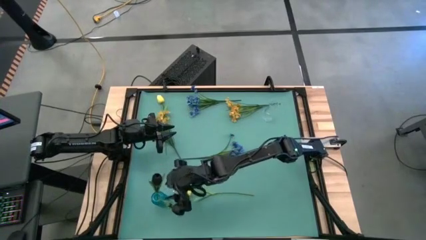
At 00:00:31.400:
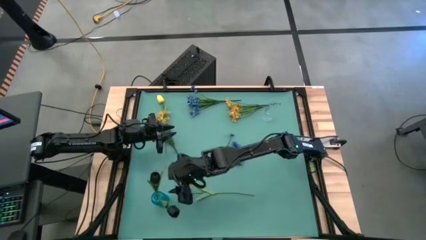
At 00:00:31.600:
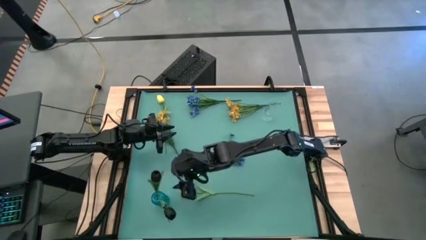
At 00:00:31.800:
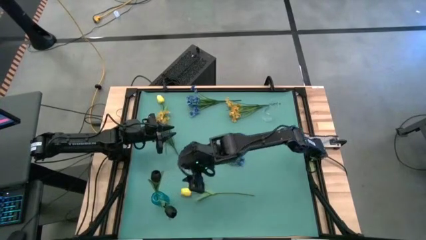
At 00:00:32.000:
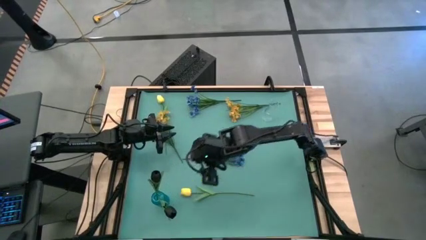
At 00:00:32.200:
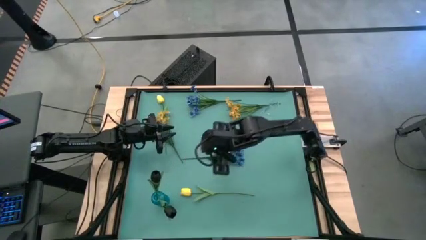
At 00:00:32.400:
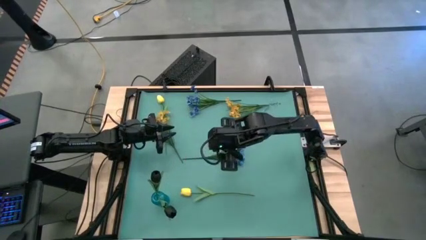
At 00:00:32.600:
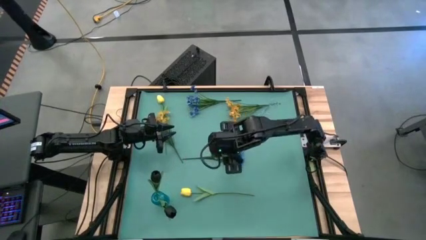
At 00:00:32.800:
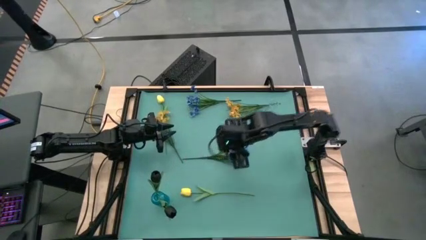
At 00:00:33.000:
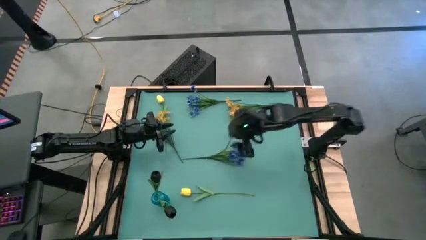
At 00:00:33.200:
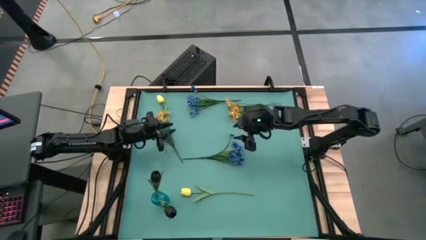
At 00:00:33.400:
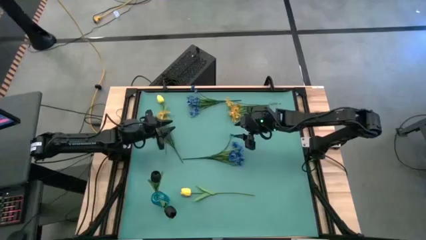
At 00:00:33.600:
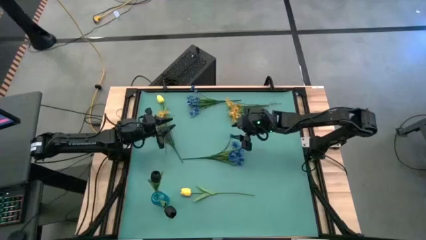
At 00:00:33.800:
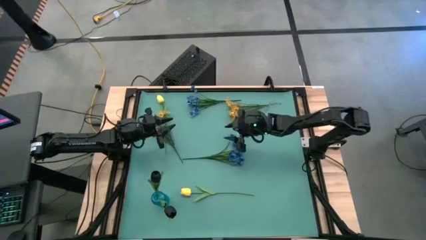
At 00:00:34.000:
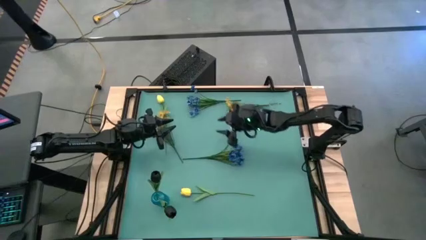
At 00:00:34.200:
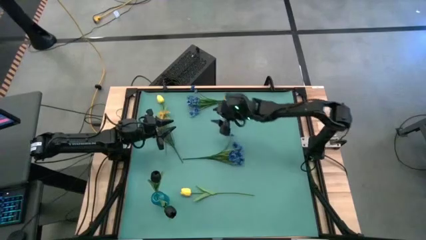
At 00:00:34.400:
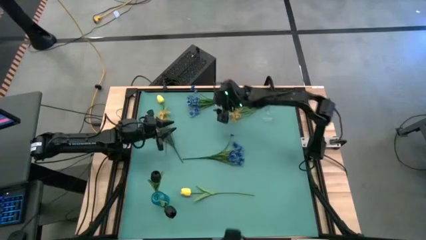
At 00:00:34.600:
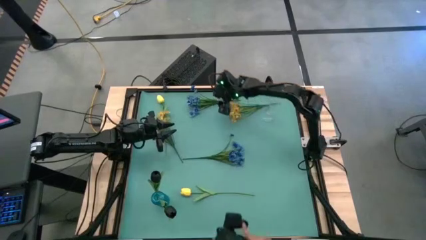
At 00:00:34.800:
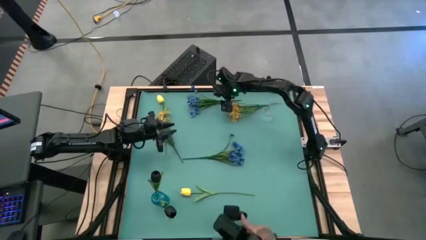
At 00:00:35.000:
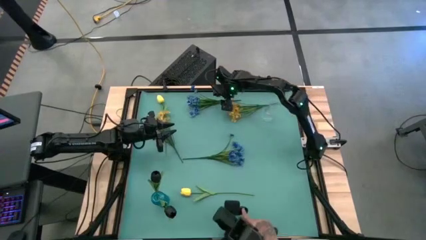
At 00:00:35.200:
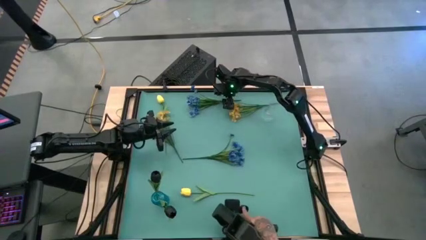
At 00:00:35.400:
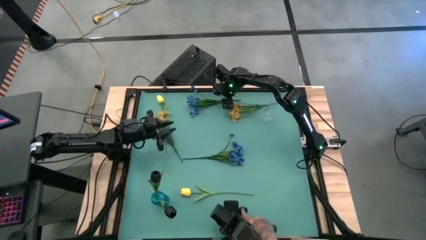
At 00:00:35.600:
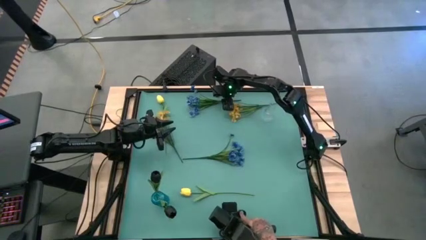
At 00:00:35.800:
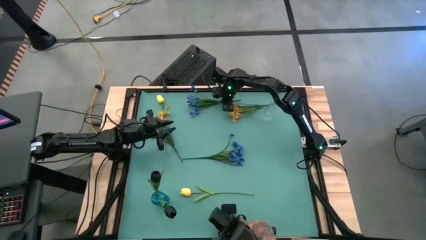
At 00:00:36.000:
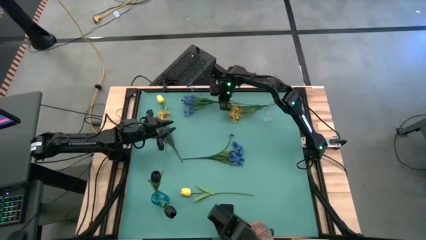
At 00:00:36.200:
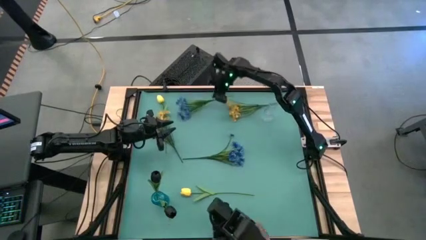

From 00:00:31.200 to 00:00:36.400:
Task: Sort flowers into vase by color
Put the top blue flowers into the blue flower vase

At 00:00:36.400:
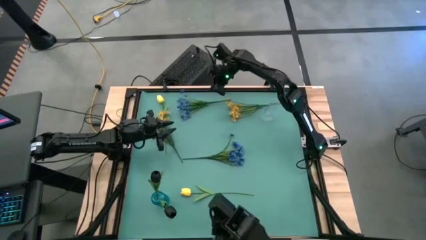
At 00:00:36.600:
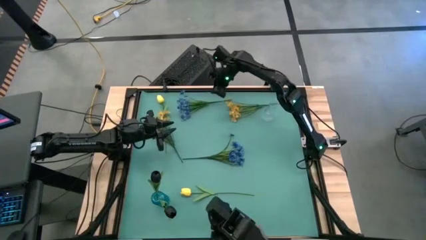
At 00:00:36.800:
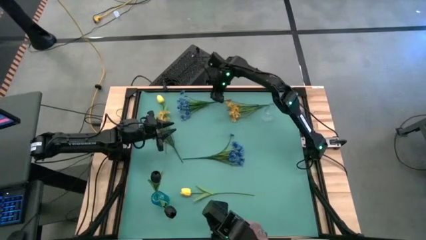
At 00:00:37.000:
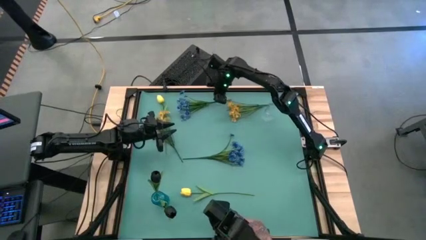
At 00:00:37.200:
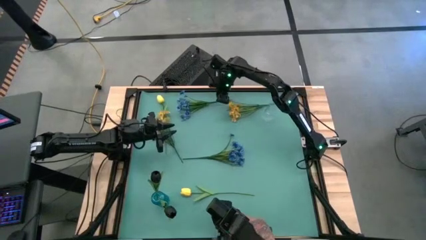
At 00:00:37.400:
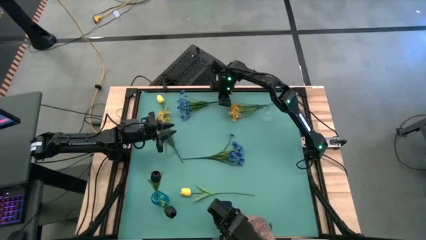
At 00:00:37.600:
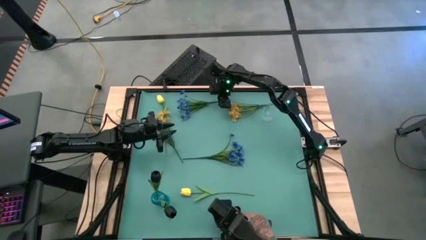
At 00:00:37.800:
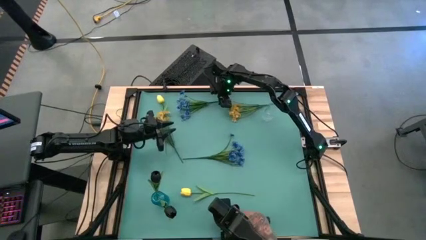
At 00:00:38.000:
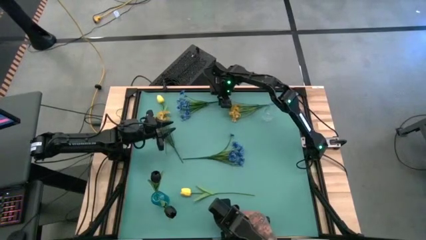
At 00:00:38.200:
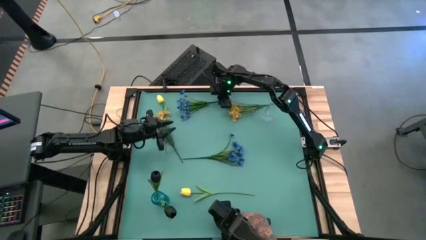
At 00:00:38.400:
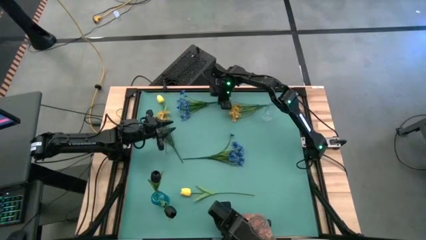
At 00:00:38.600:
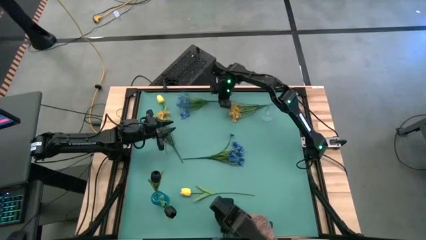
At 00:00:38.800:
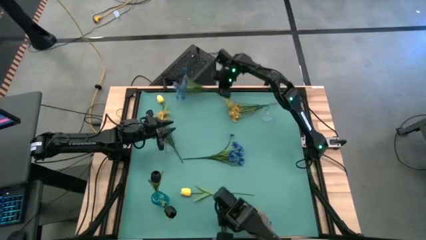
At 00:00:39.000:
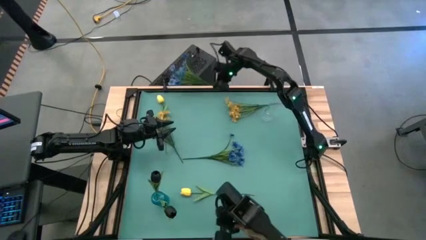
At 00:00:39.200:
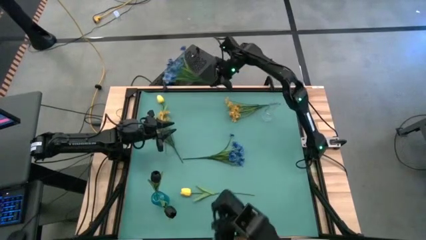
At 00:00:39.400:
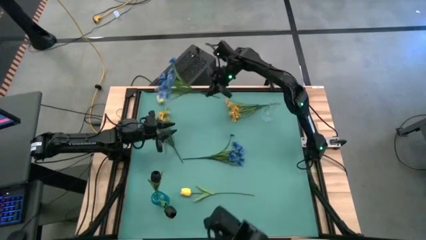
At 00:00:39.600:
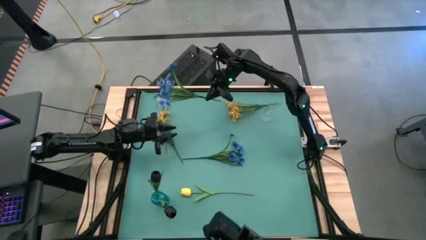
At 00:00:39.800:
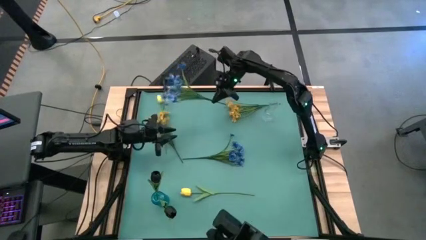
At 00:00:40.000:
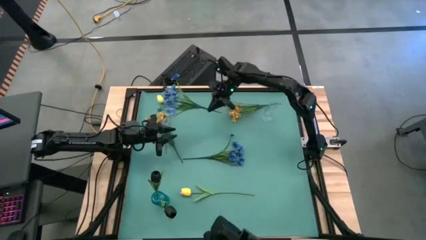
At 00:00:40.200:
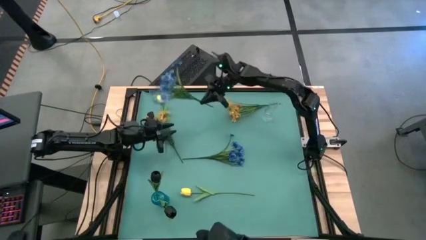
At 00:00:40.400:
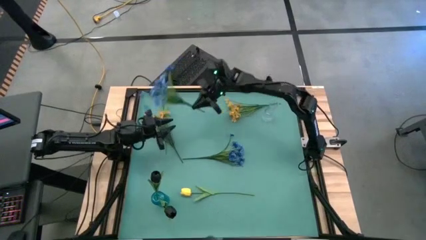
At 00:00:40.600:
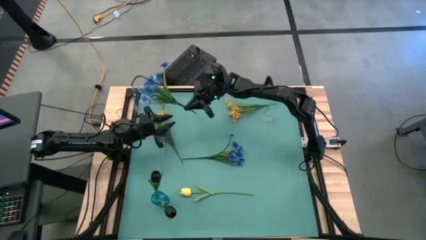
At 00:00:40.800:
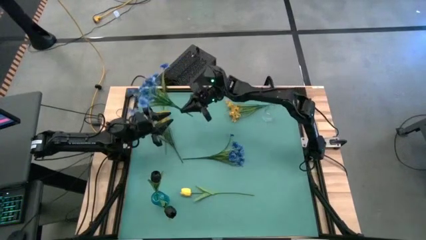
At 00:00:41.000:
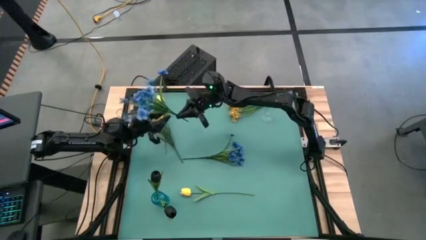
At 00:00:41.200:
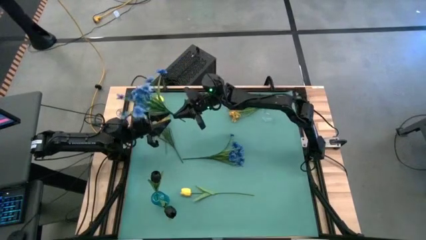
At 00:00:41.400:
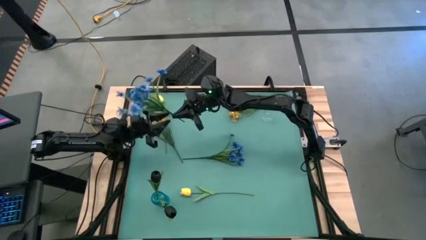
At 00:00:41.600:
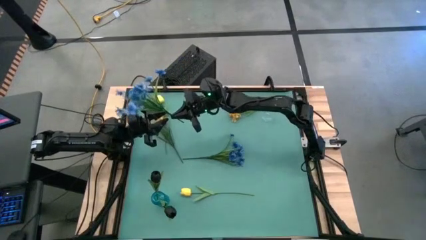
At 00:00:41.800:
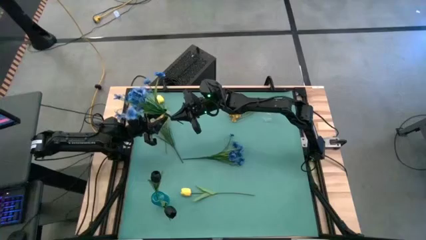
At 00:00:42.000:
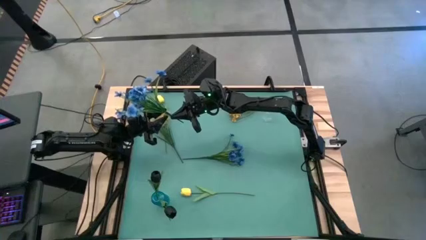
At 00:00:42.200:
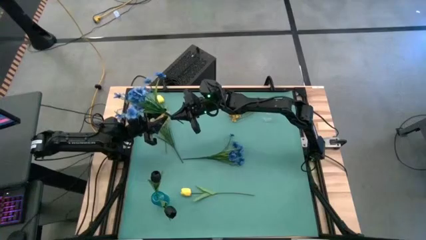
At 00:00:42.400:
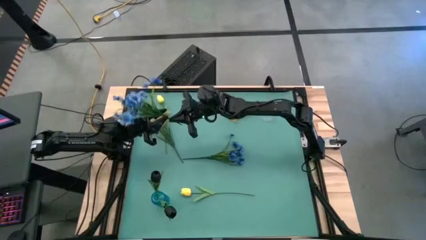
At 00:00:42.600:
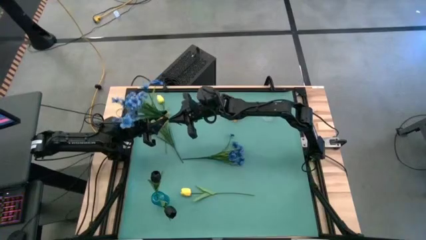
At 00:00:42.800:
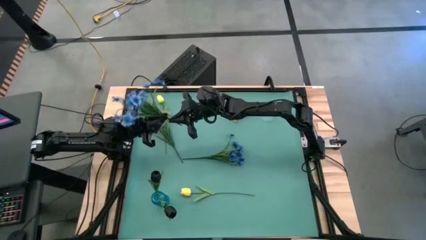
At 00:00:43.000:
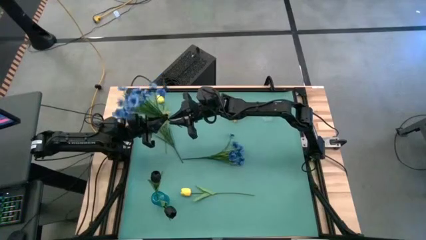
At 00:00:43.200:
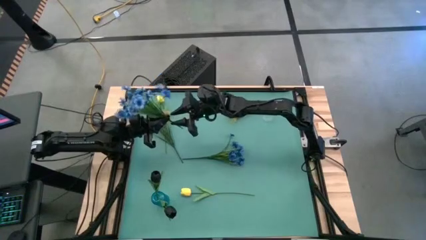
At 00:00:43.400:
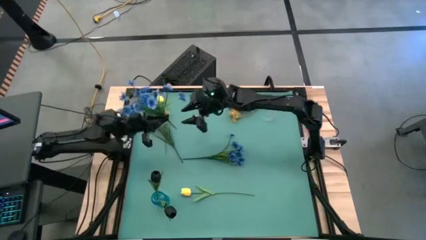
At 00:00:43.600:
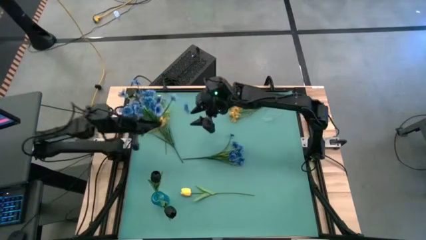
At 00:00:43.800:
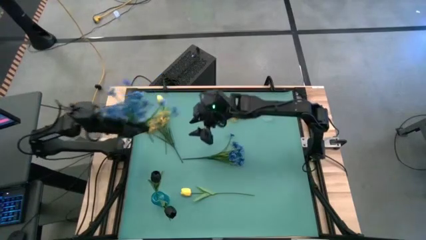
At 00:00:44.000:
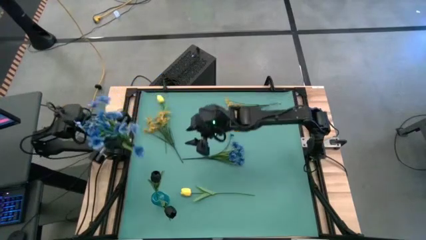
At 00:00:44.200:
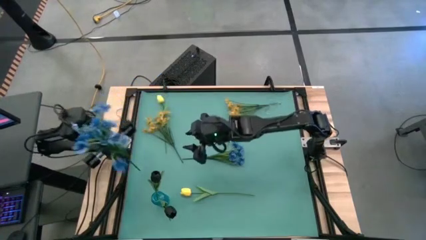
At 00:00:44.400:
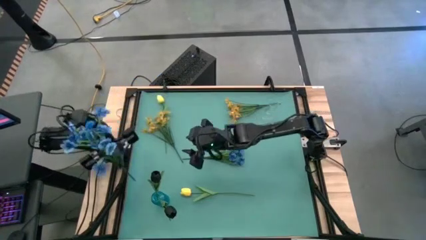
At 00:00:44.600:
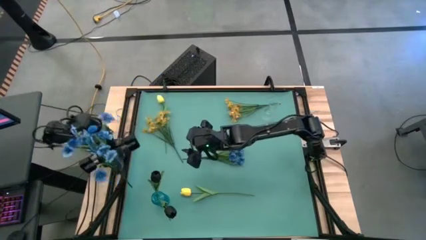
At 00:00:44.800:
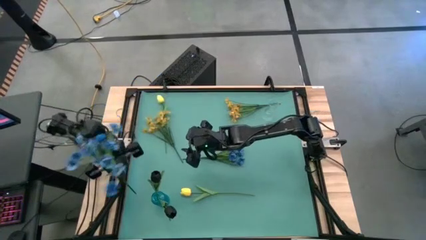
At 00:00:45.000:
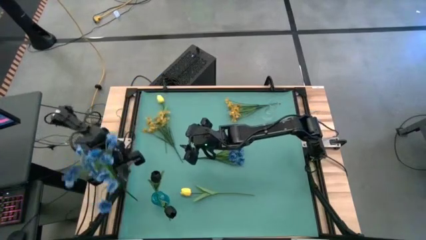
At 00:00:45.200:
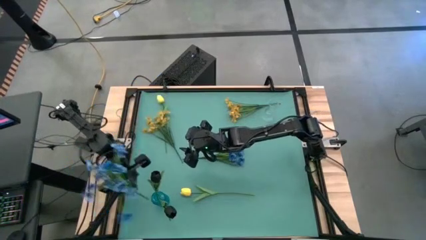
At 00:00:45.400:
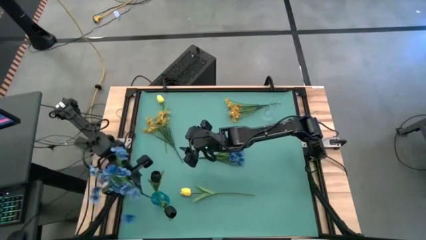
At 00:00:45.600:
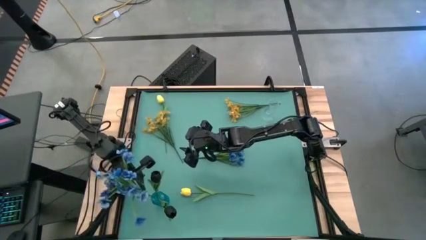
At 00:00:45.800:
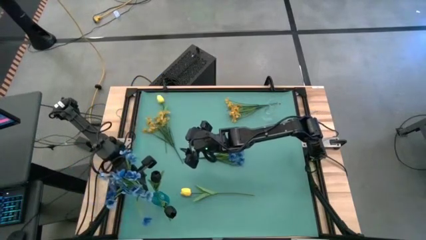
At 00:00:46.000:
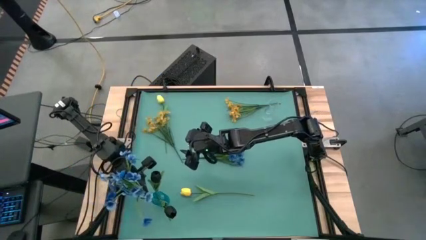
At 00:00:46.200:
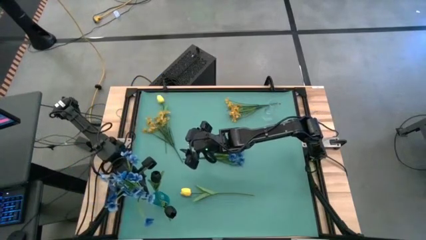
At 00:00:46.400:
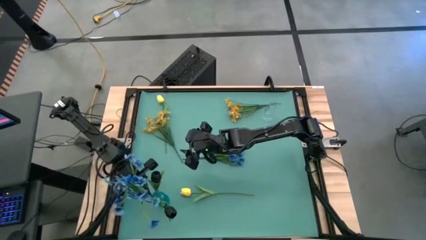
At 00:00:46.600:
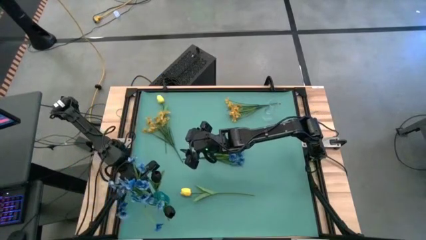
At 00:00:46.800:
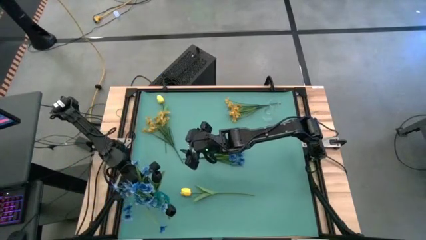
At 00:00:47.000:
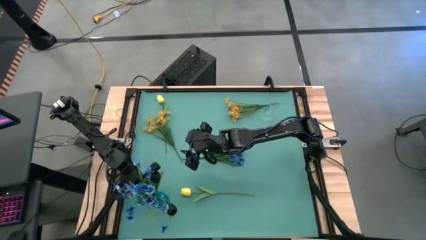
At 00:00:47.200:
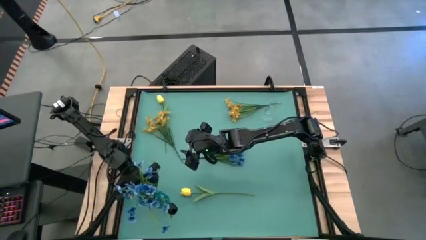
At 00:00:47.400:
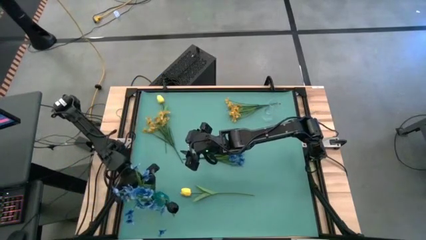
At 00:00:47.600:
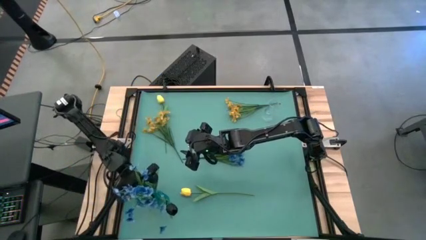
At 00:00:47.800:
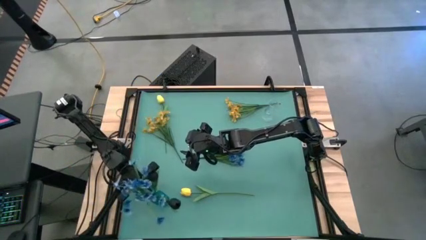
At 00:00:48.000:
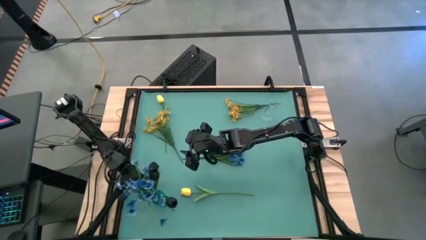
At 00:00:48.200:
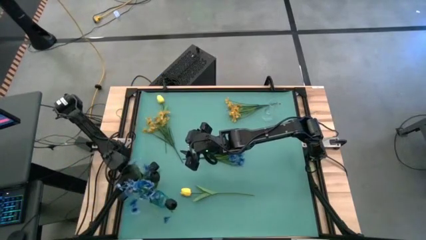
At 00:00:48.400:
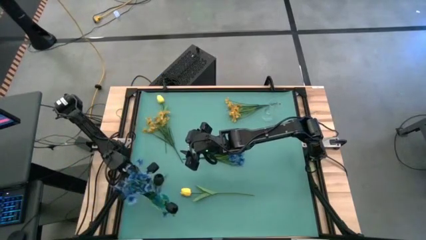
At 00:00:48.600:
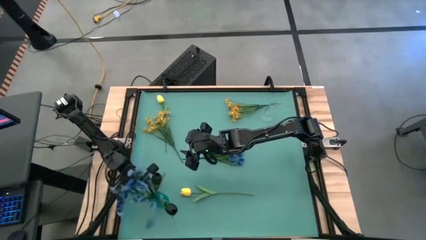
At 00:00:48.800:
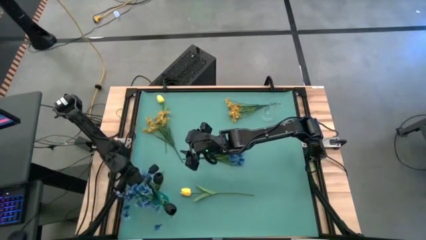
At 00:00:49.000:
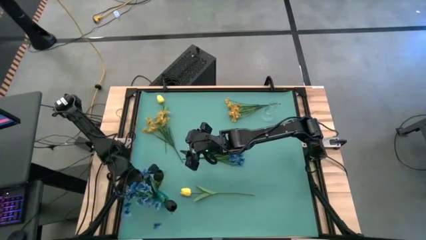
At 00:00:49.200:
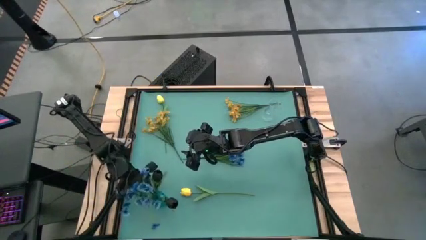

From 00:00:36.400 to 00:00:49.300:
Put the top blue flowers into the blue flower vase
